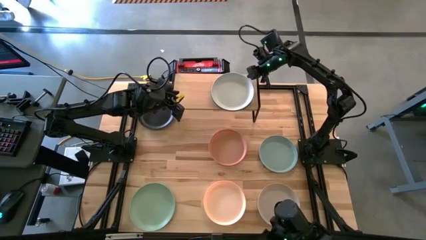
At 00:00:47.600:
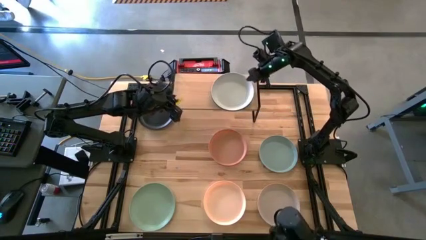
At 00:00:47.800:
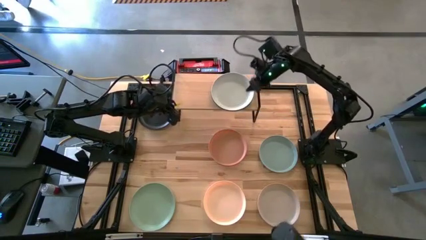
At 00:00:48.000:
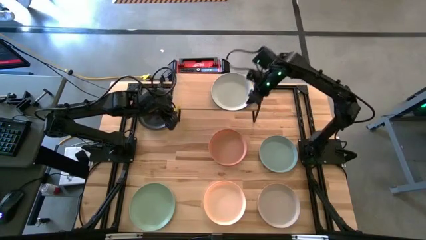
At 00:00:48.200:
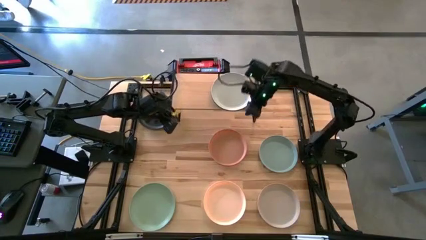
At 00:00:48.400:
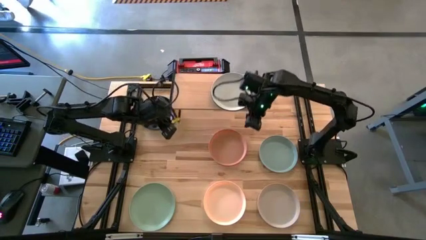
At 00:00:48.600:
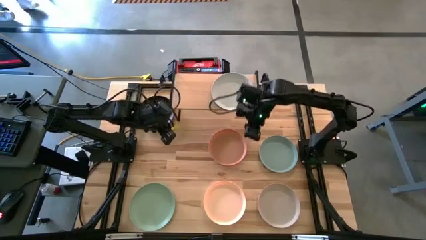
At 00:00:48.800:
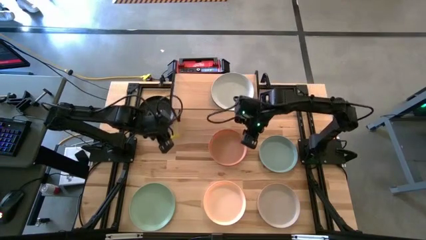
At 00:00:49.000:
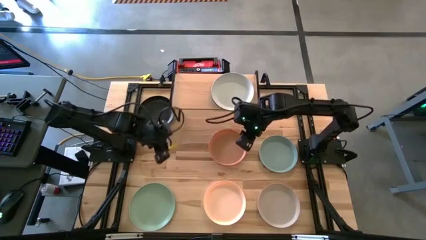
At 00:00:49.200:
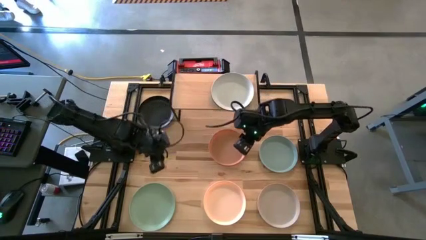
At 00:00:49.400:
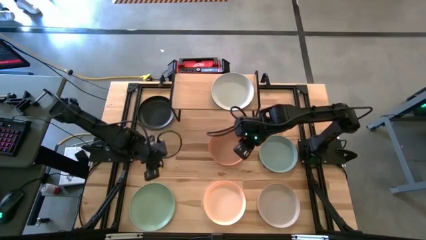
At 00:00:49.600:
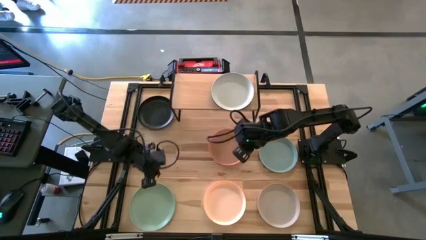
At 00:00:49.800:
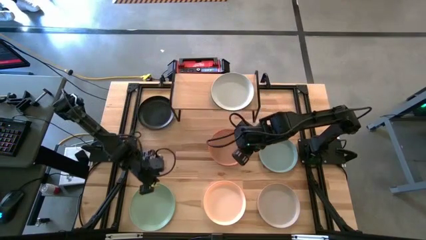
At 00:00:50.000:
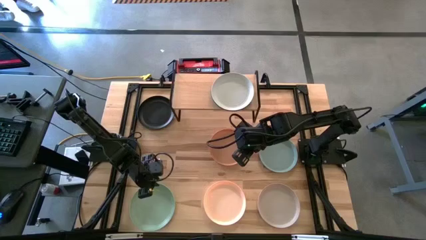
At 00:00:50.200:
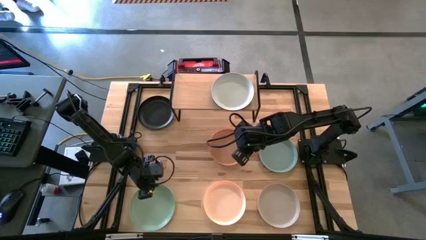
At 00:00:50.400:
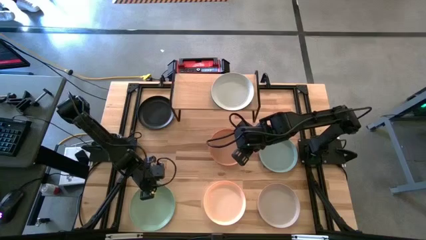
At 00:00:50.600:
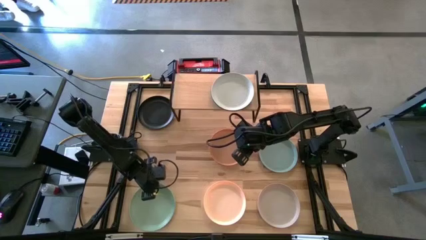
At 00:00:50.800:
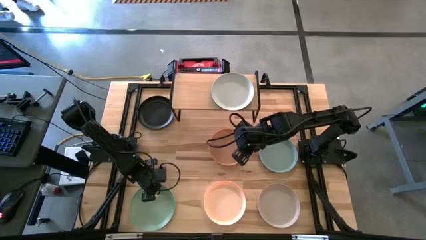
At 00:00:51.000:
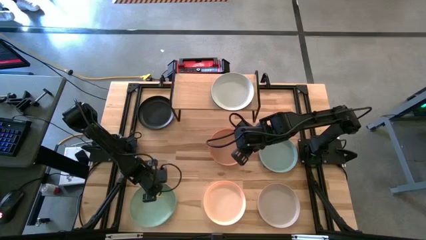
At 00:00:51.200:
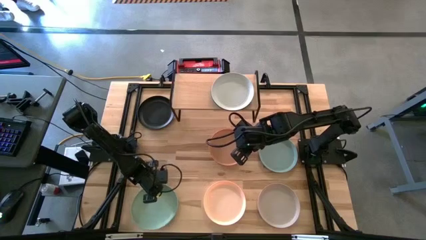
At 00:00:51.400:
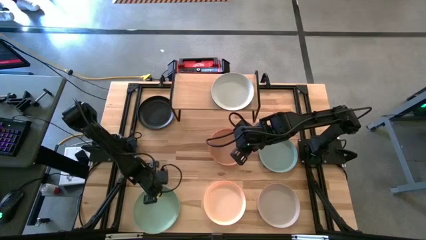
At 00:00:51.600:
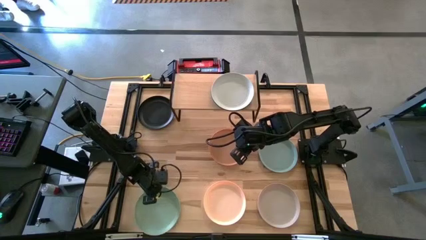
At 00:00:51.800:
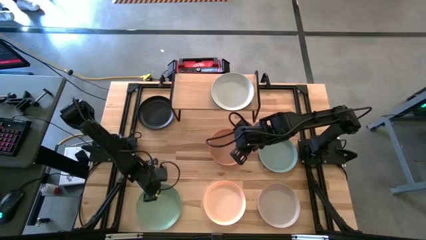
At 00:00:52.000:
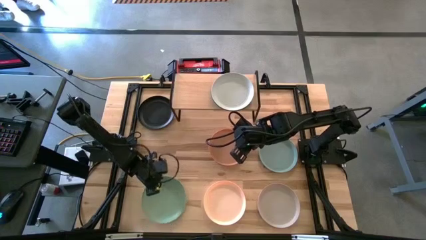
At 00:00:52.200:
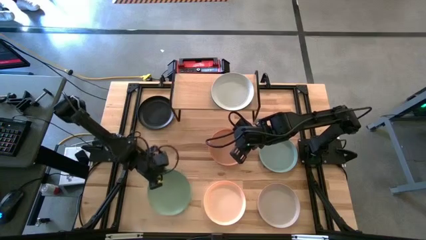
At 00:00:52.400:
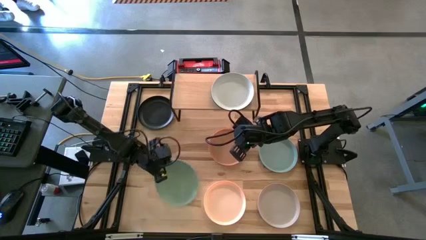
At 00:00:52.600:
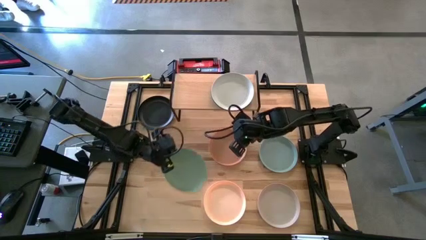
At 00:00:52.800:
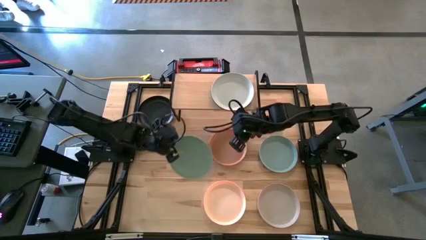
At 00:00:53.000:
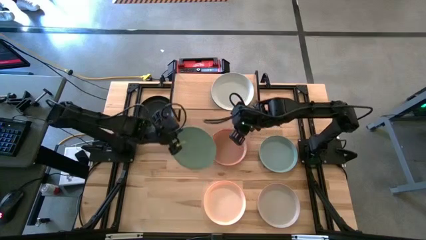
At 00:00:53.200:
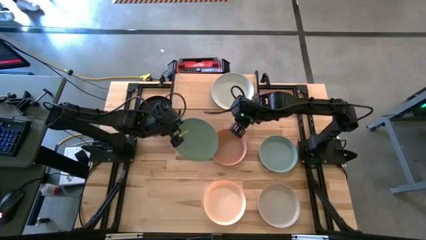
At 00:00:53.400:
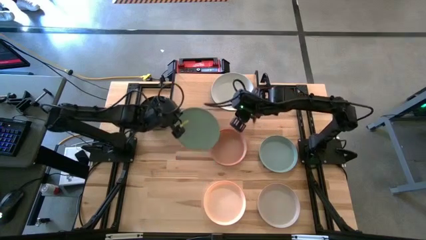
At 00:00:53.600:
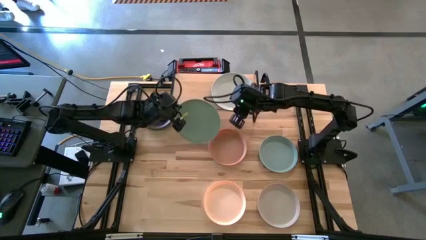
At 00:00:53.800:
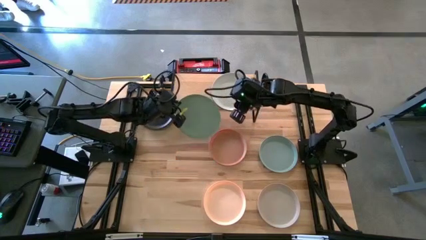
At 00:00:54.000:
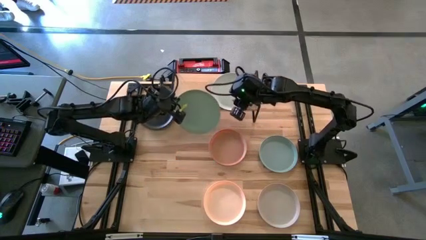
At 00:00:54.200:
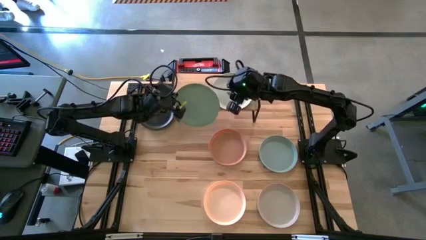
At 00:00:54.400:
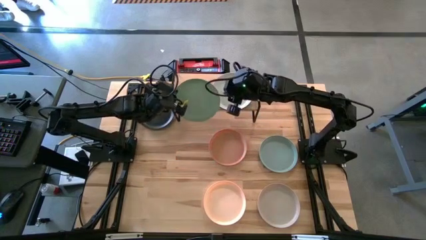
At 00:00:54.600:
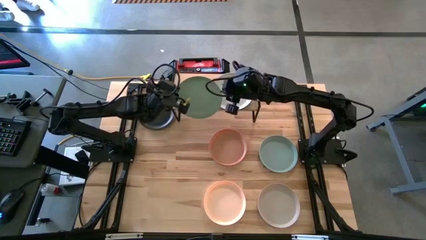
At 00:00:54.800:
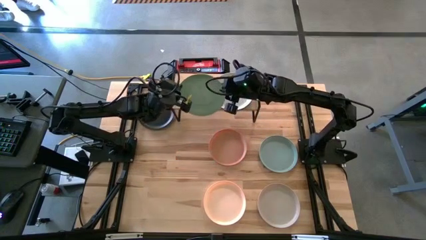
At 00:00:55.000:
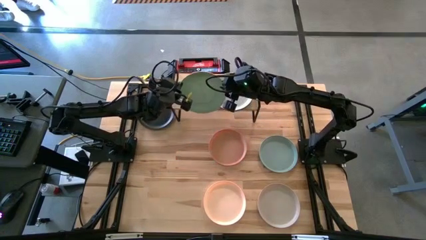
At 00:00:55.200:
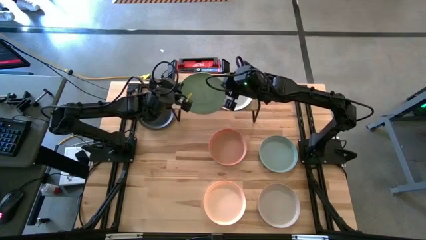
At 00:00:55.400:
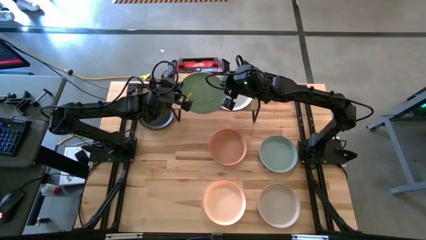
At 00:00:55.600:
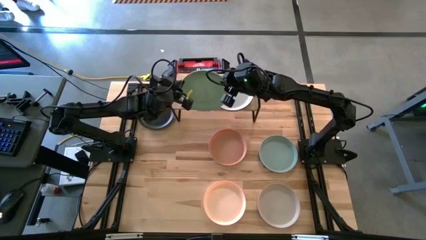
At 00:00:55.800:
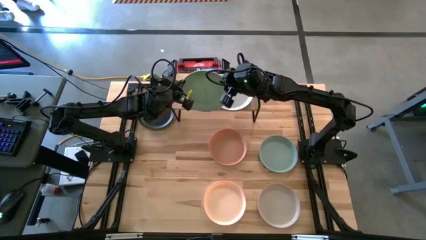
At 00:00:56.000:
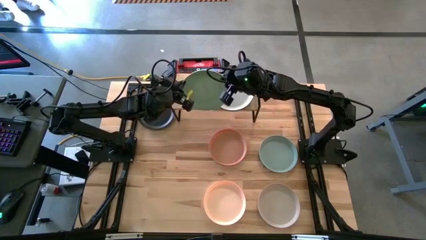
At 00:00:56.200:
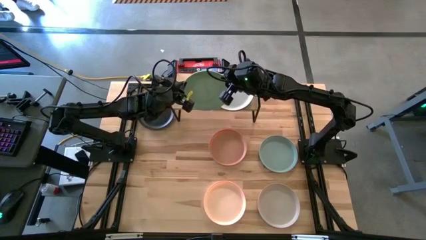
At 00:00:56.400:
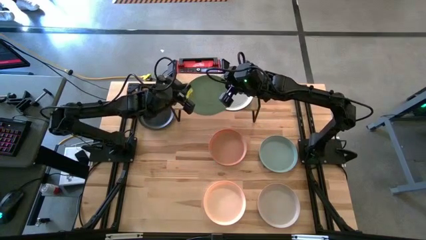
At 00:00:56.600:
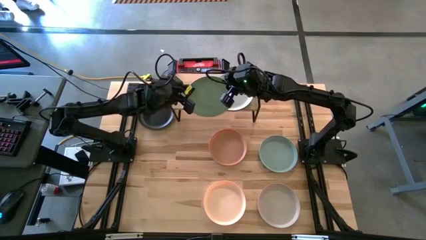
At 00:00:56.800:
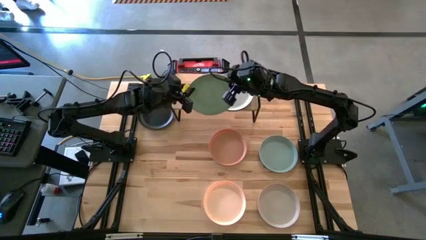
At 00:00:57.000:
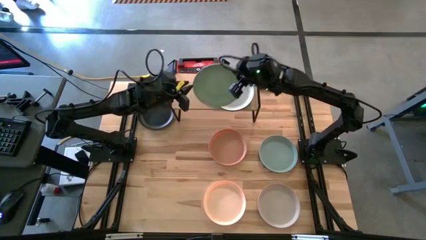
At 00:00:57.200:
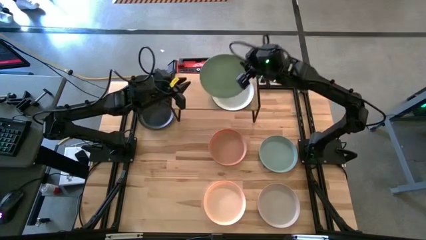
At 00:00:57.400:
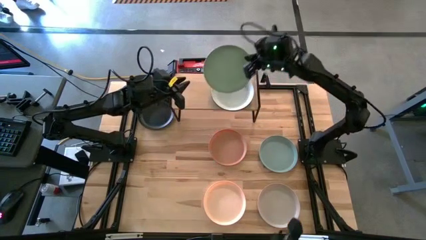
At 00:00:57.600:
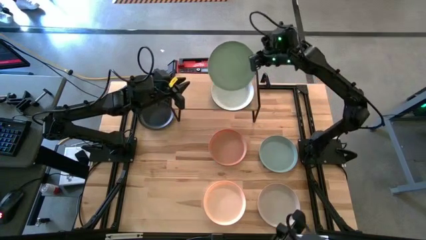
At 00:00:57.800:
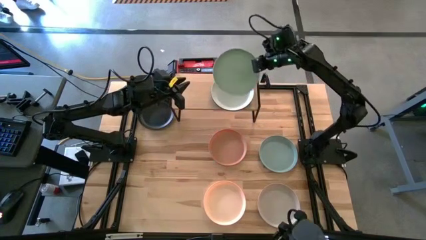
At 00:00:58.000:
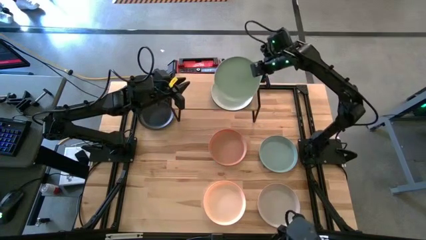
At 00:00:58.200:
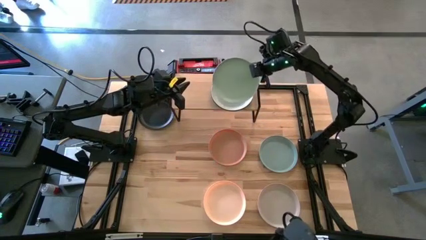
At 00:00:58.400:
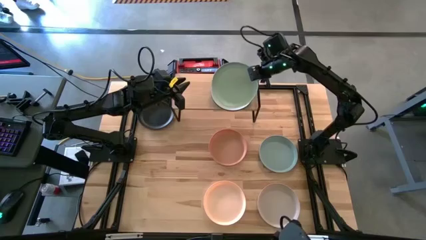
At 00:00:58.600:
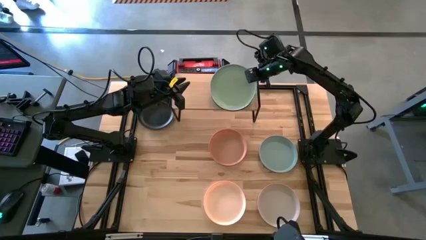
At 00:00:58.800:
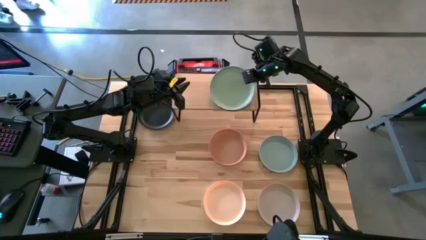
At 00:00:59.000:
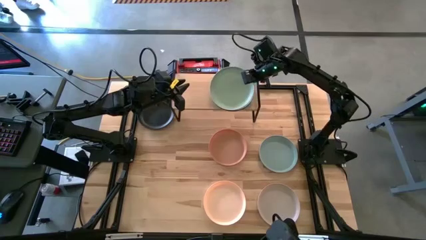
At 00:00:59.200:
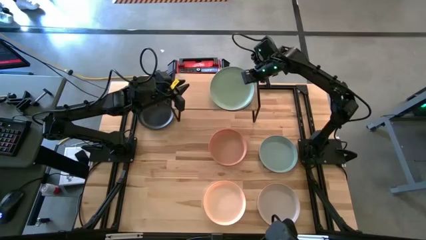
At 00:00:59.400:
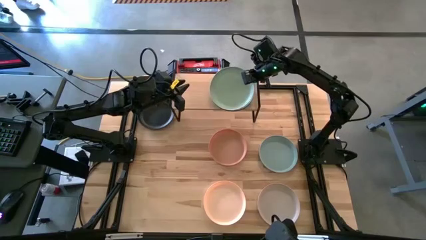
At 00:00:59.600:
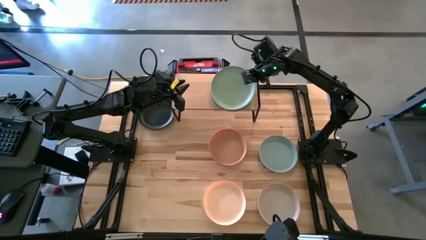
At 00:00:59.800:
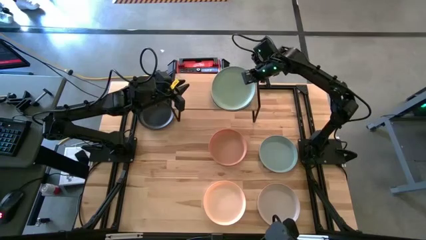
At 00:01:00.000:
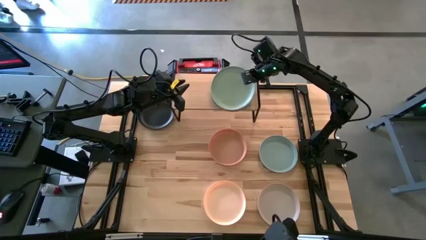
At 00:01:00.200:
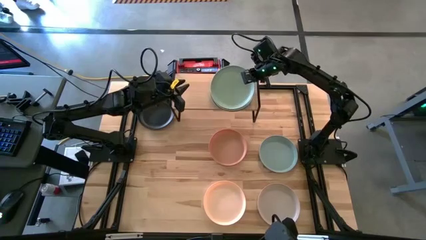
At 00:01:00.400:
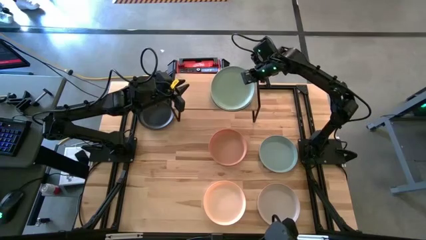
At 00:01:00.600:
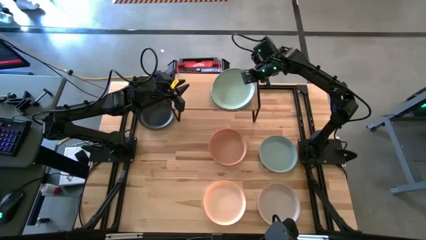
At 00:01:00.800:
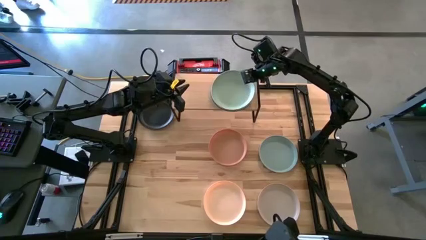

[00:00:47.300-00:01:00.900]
Task: Place and stack plates onto a shelf
Stack the bottom green plate on the top of the white plate on the shelf
